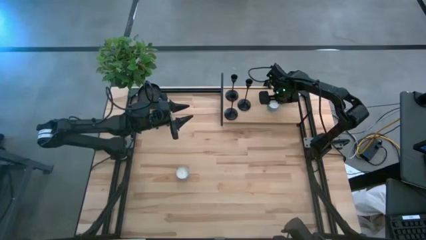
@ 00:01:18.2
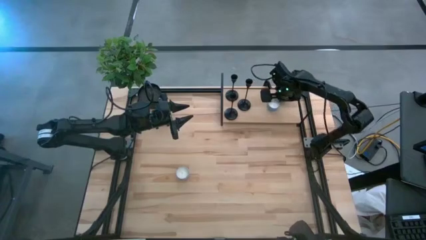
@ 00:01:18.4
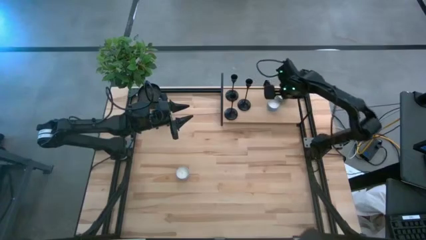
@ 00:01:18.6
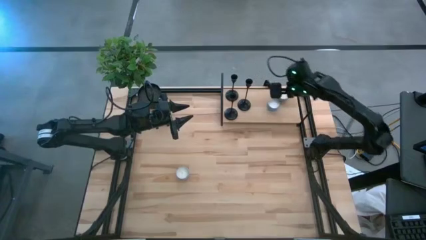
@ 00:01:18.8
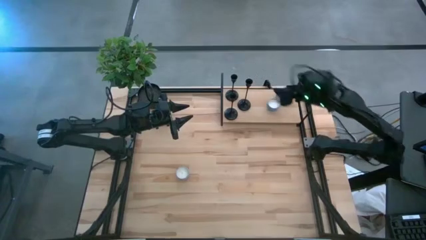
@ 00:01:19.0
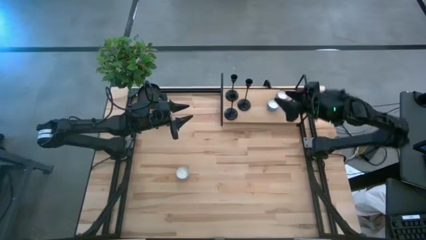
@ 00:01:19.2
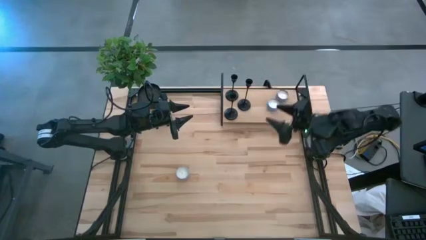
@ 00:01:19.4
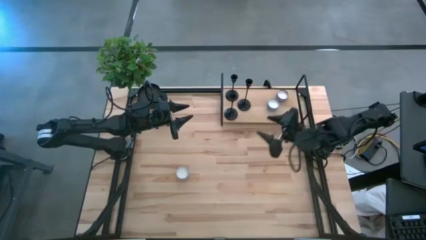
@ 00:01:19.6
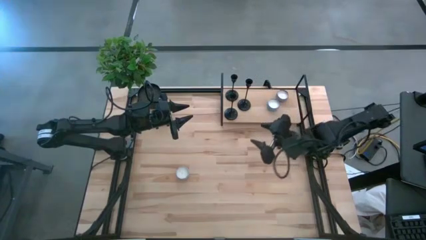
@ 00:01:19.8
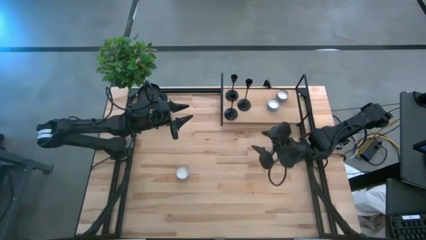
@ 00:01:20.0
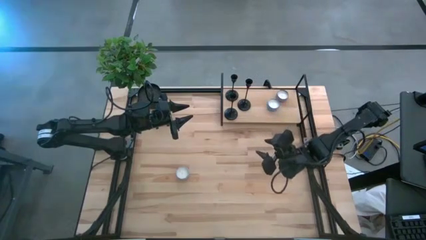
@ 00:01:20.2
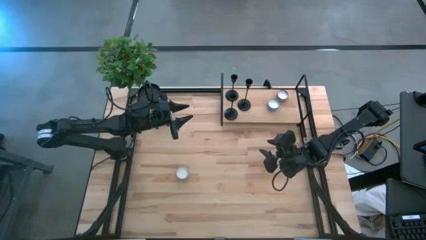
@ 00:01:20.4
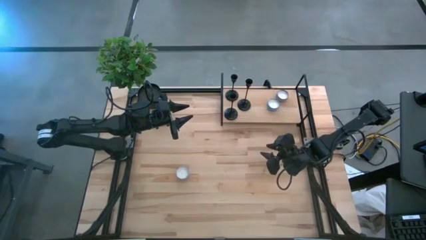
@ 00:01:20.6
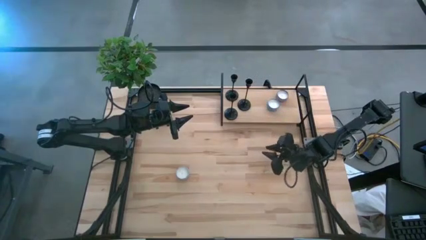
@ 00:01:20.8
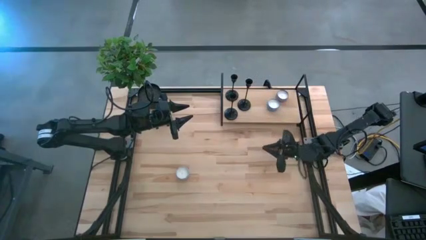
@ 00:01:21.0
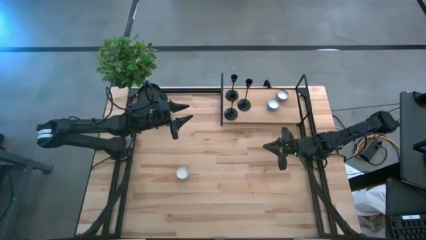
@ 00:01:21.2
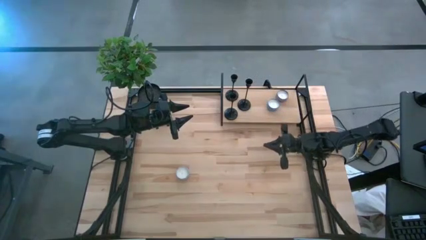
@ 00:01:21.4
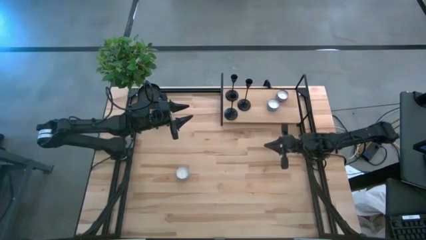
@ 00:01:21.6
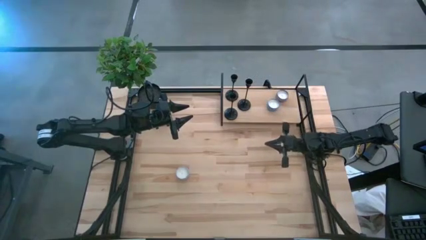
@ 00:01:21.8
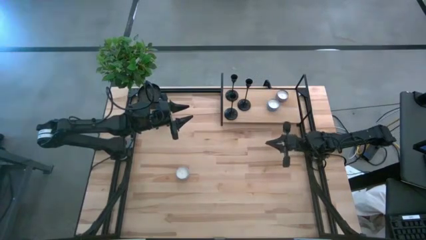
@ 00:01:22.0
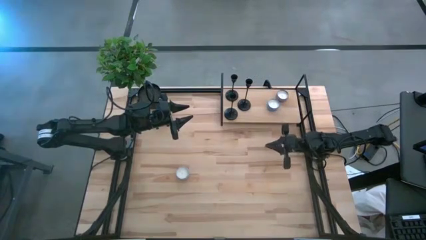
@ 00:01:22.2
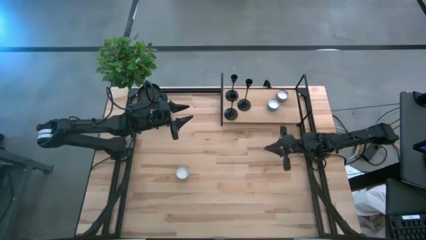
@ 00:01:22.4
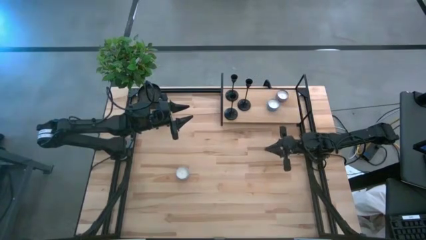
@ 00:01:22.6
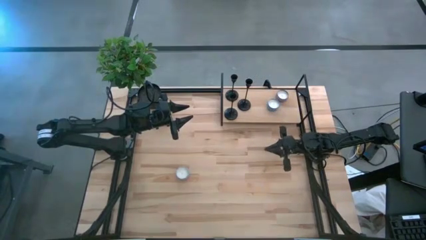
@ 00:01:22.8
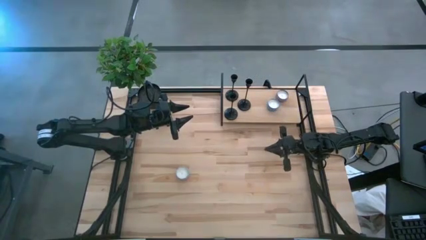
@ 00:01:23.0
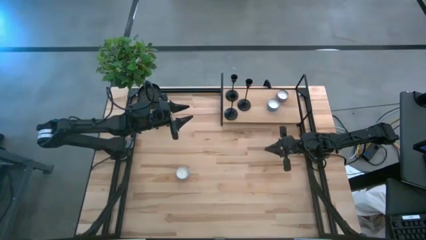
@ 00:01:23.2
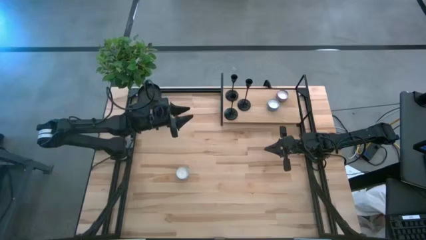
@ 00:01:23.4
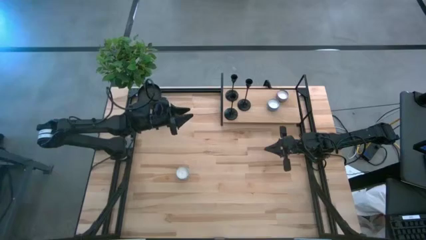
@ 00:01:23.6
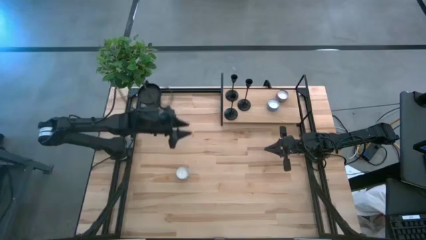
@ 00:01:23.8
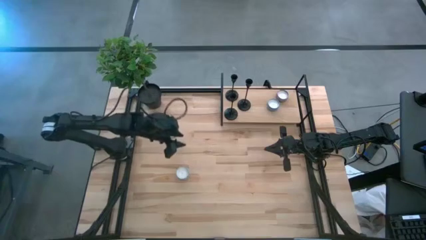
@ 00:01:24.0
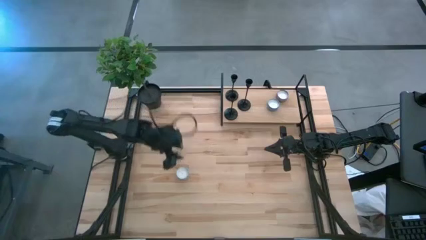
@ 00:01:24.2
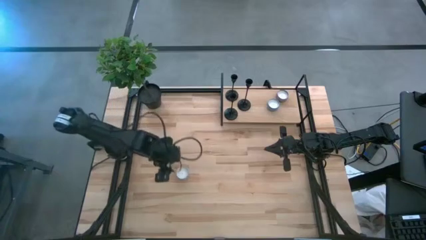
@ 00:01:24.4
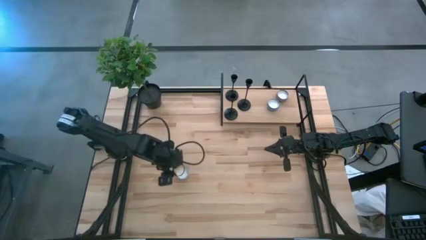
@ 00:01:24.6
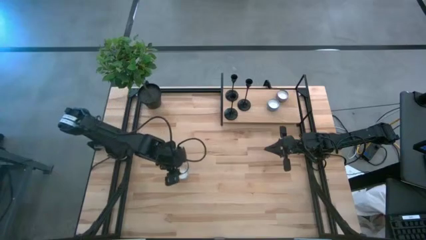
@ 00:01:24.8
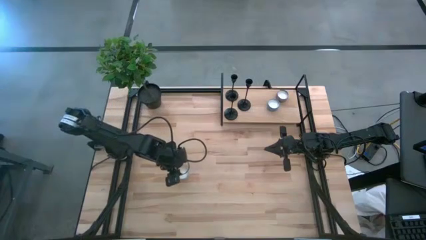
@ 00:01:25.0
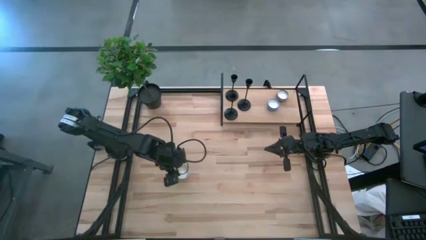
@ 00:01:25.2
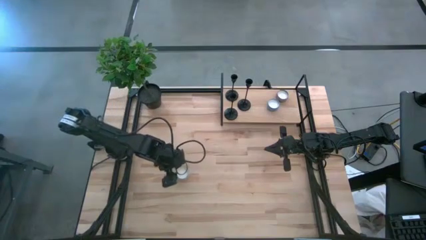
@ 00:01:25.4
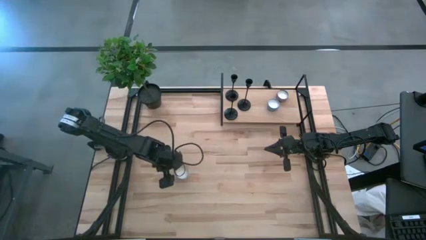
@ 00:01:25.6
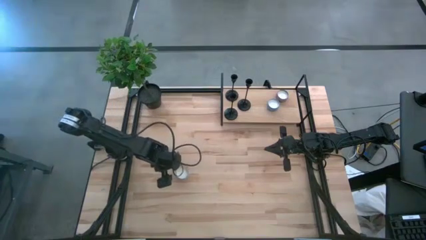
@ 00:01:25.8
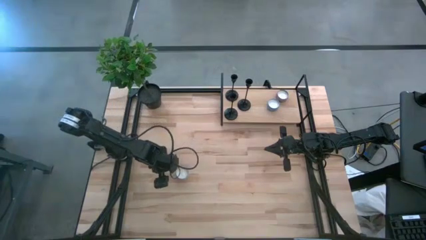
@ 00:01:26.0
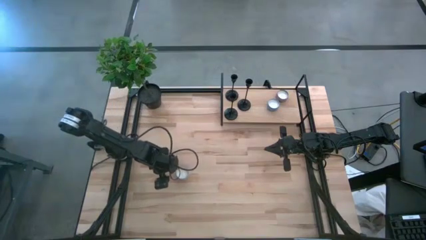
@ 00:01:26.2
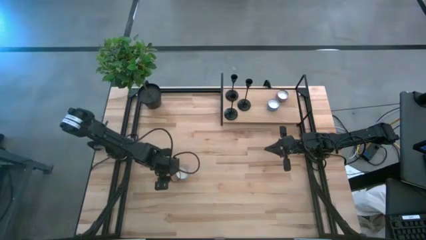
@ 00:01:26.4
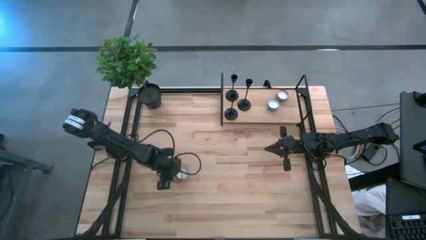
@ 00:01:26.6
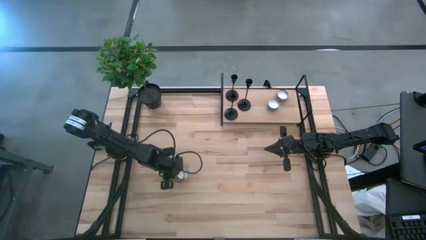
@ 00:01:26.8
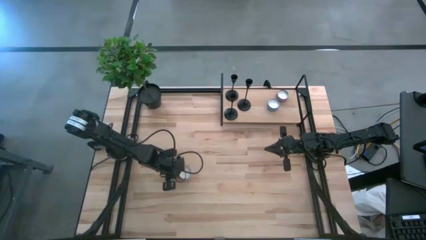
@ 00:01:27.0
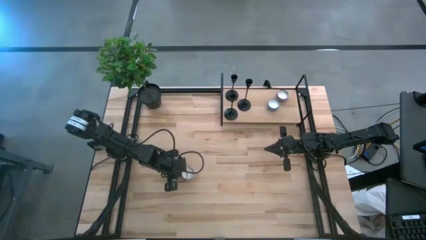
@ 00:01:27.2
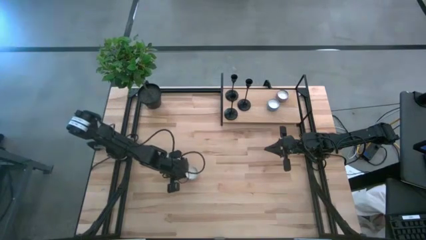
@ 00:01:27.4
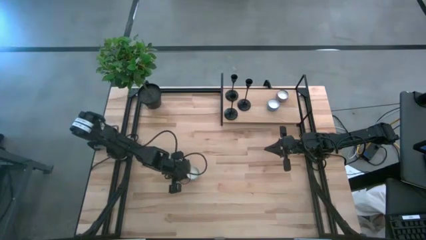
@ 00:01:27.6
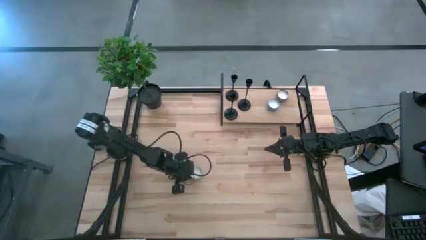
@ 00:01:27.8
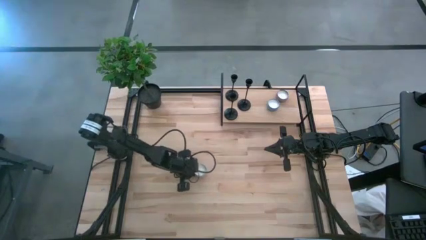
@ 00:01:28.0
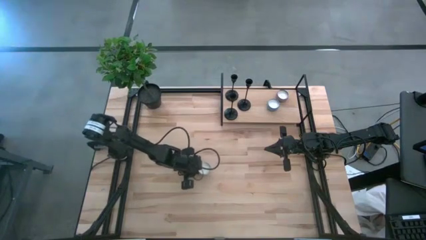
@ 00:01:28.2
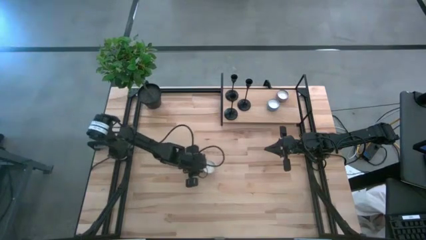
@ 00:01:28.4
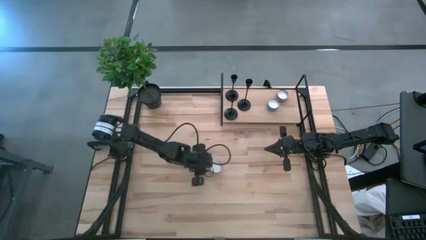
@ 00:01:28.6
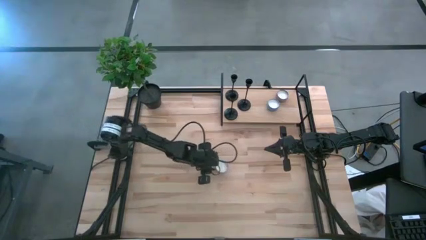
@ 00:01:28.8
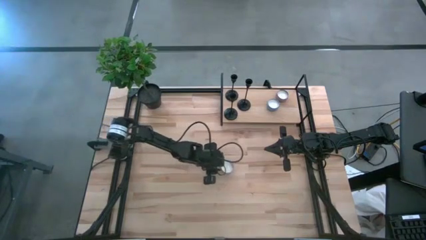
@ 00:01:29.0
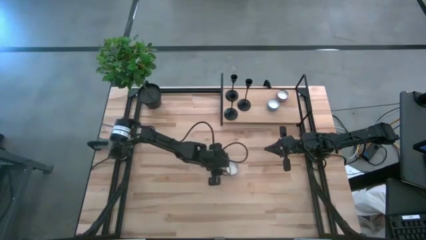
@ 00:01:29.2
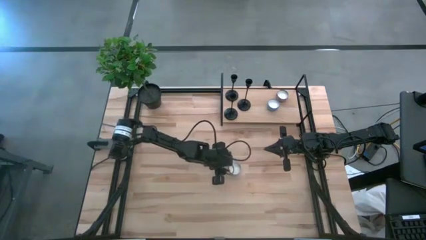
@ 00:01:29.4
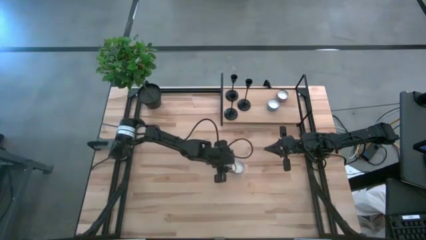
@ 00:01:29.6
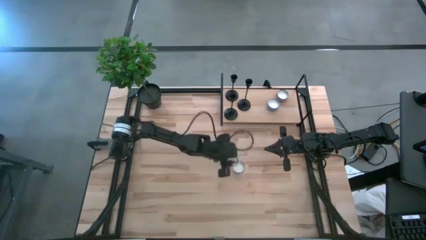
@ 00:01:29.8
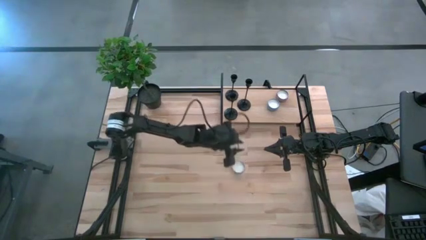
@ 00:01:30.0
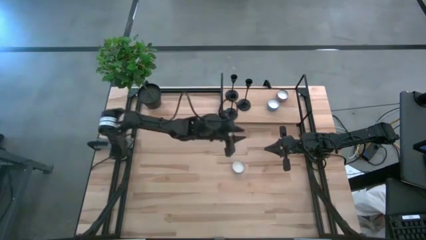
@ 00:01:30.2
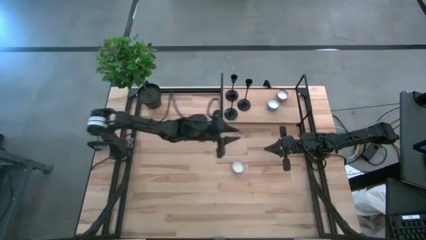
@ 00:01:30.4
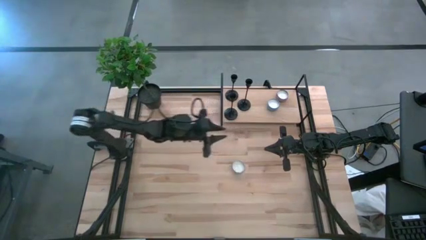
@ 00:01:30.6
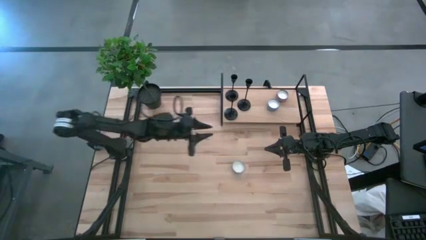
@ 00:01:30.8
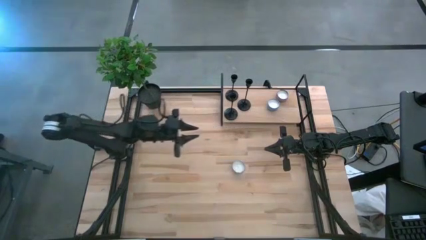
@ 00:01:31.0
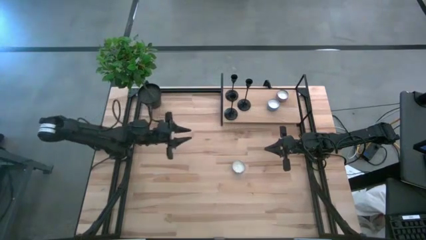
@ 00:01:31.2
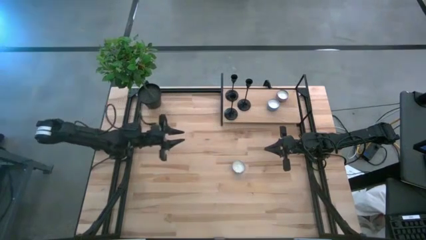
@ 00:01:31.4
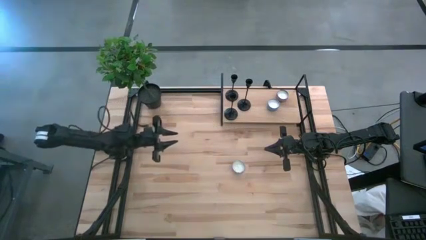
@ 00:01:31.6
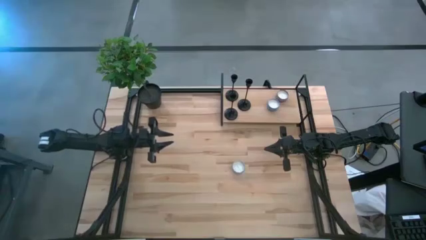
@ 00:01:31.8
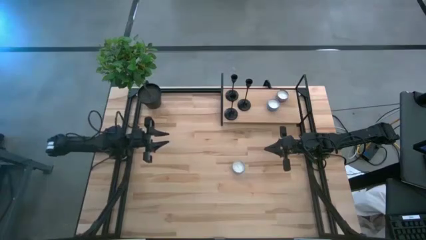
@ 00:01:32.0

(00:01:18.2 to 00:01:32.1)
Task: Pick & Place candle stick holders
Put the red scented candle on the shelf
